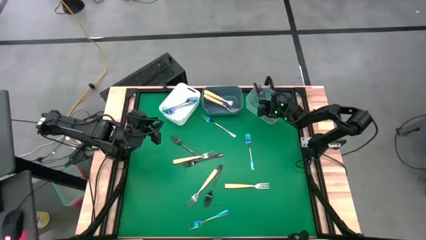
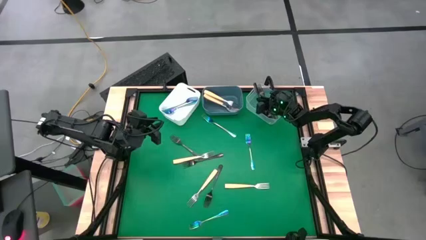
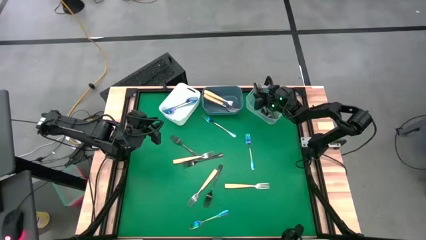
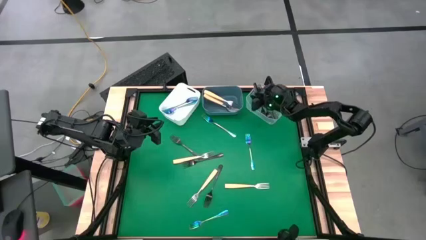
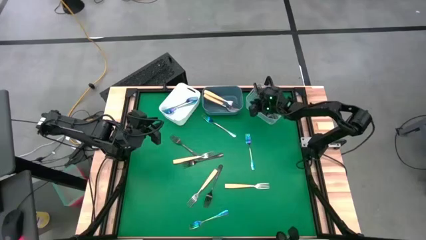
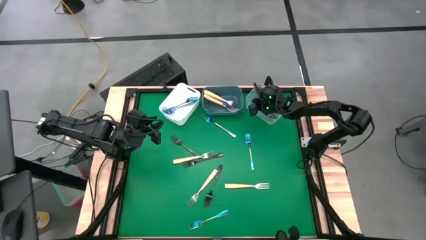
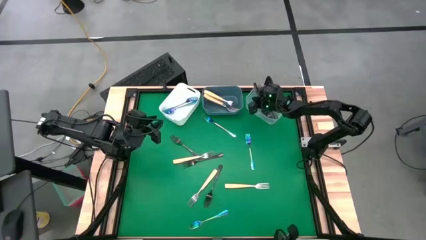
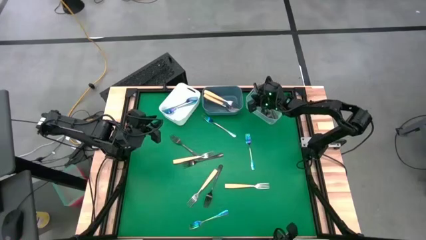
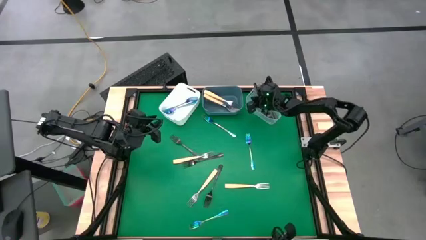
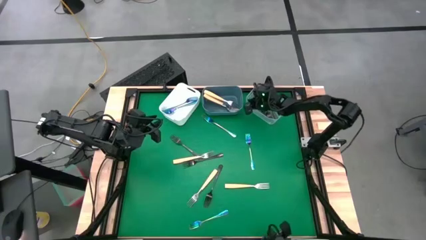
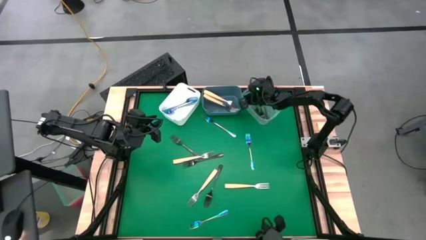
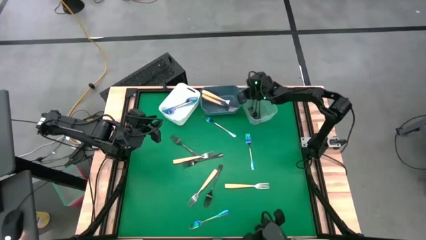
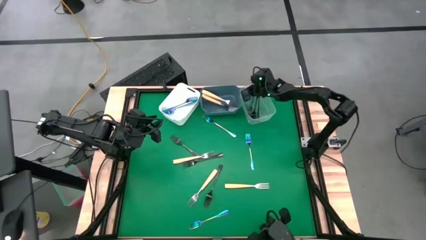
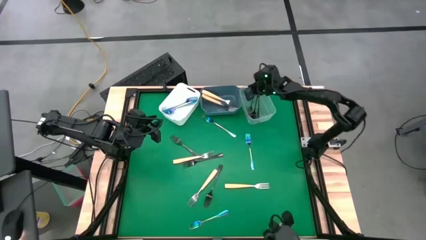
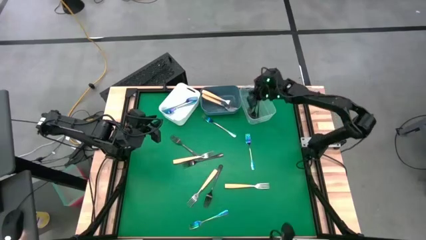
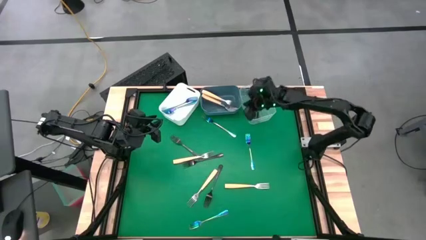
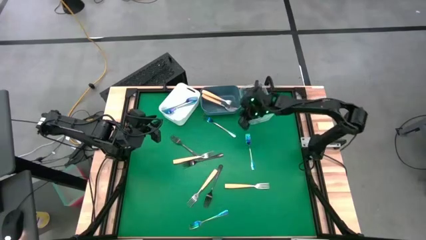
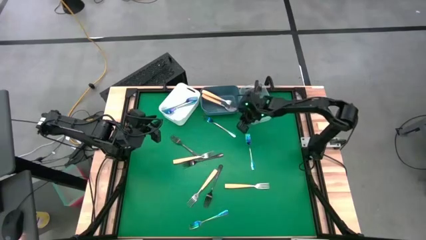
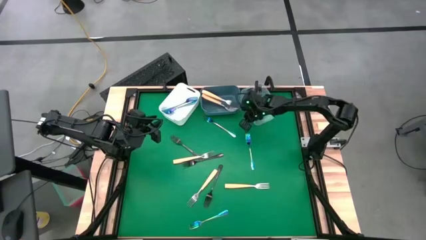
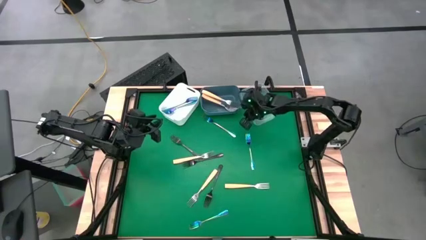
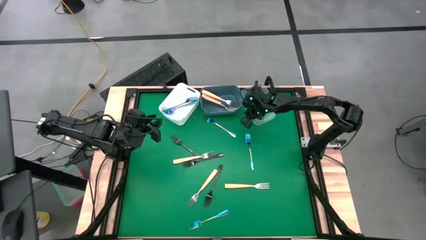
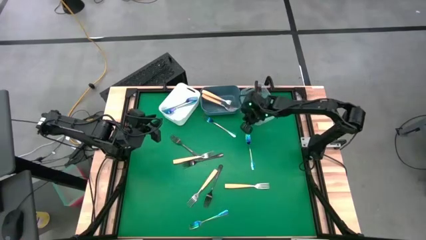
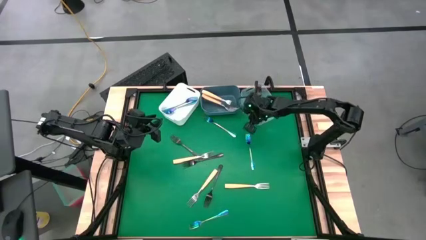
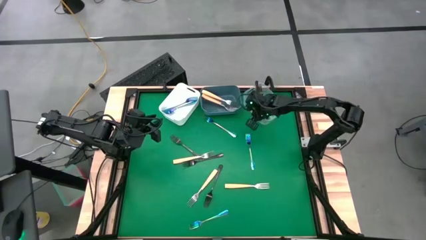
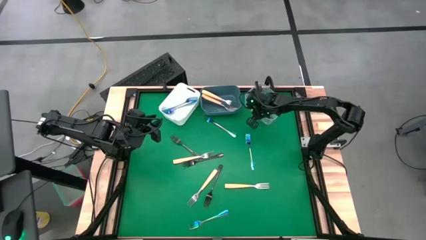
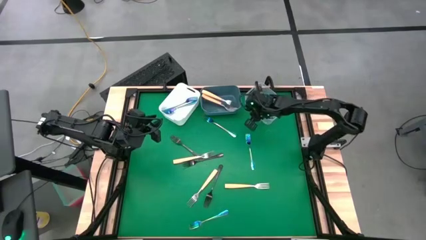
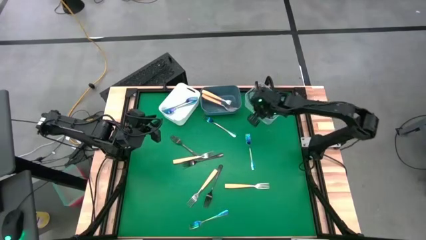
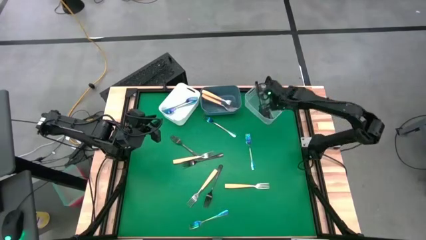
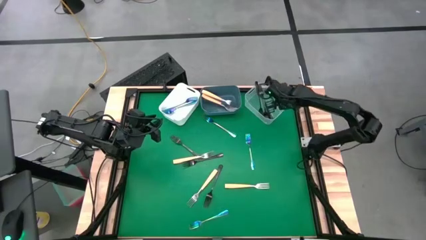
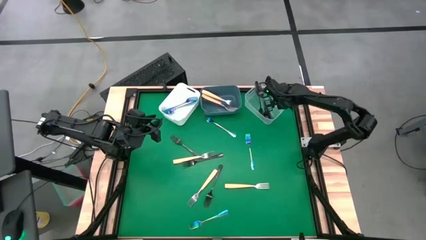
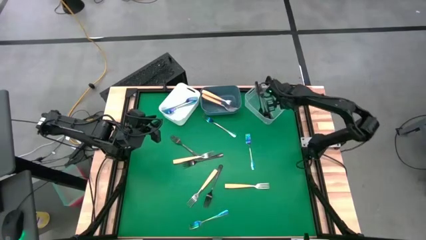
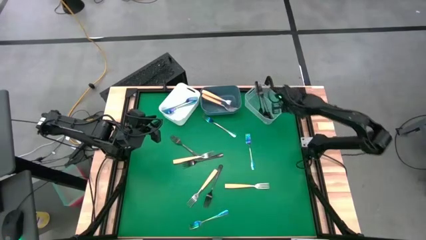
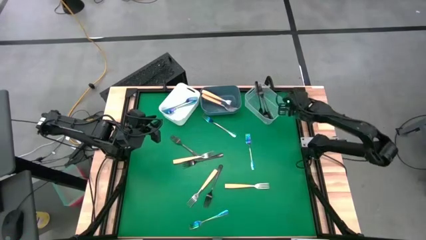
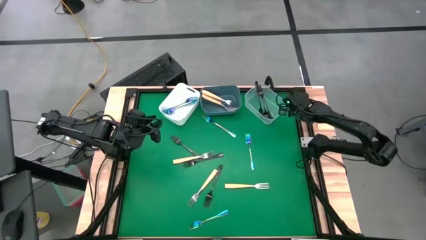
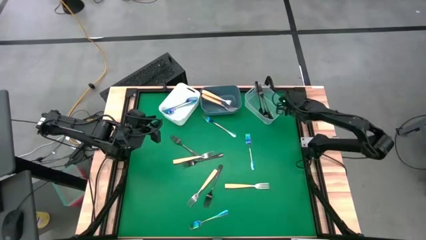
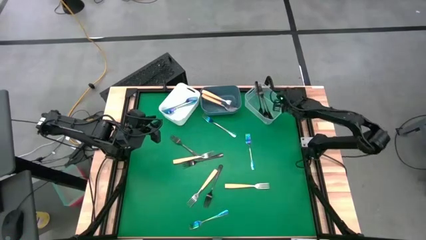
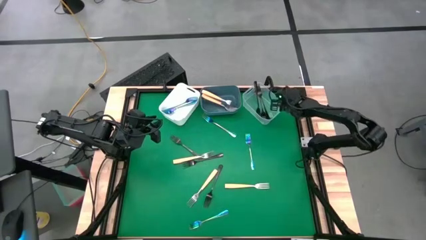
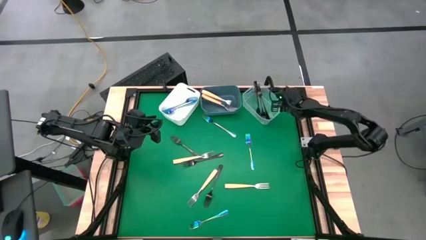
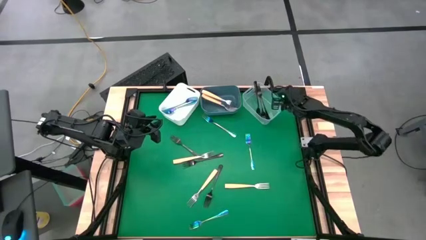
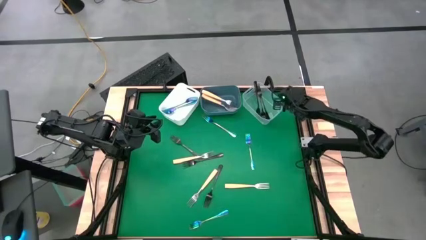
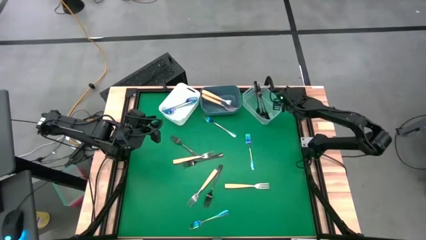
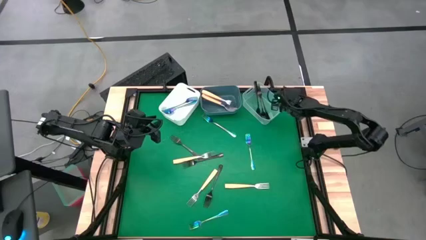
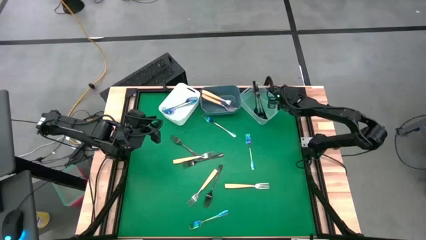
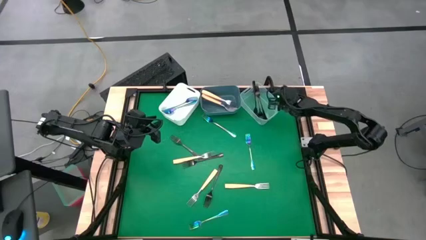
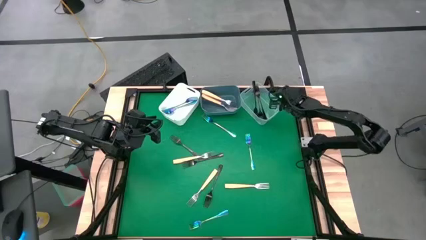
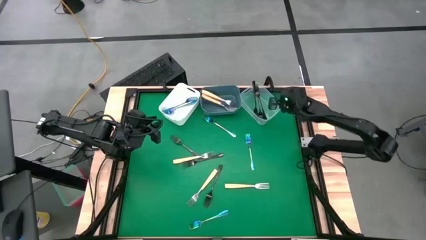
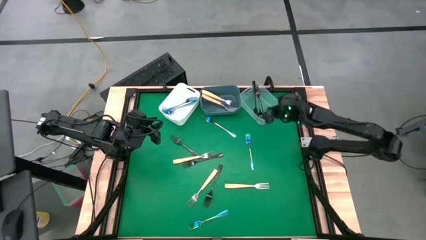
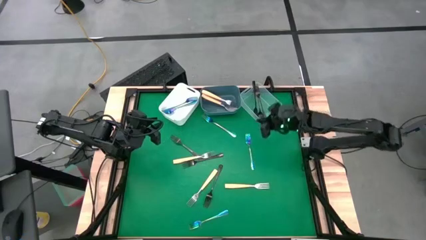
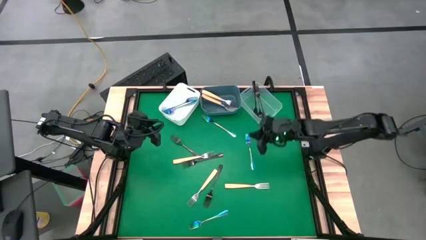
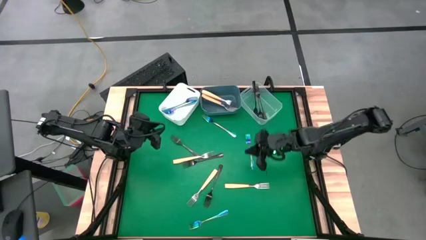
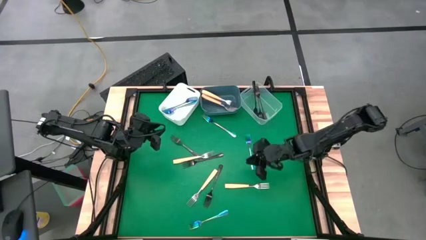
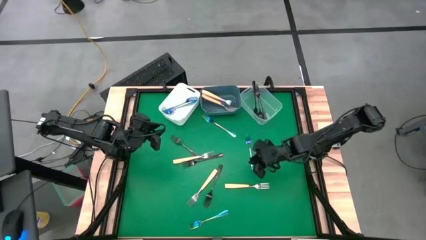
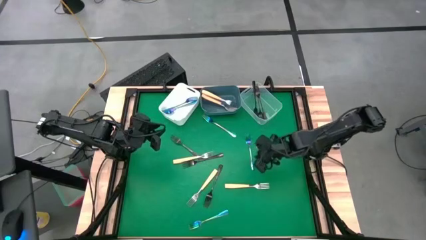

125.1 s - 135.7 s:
Task: Sort silverware by color (type)
Put the blue fork into the white bin

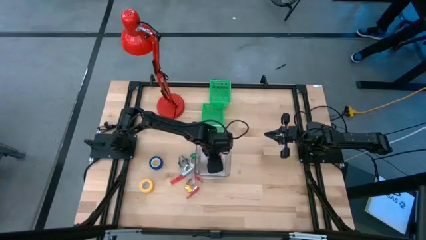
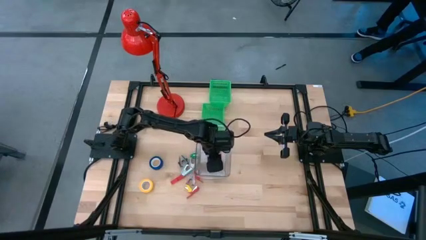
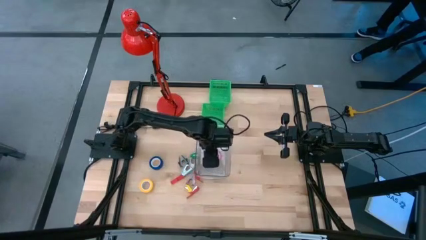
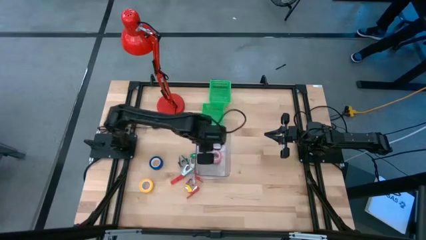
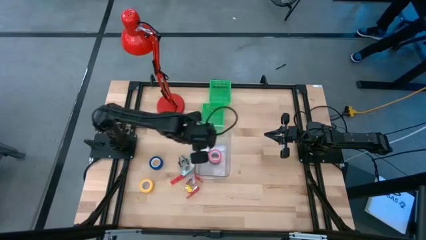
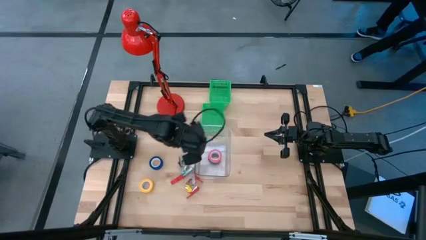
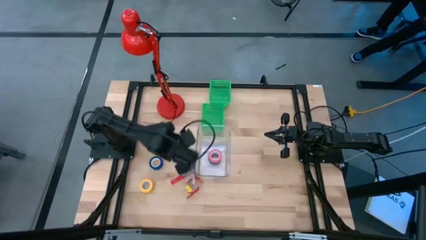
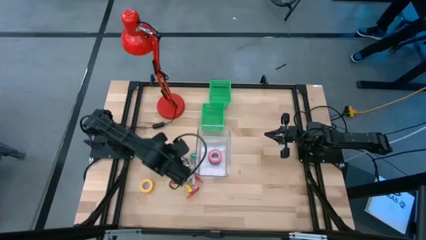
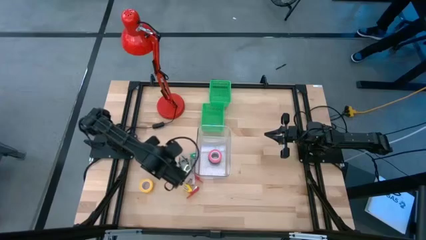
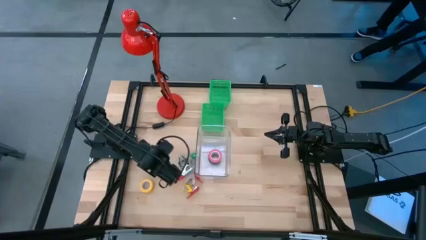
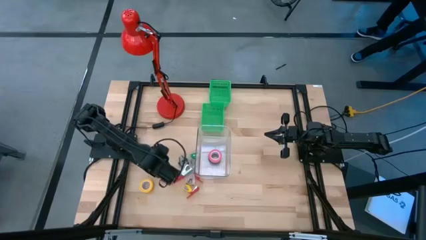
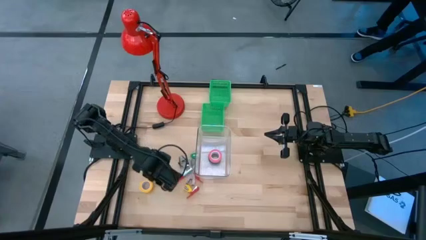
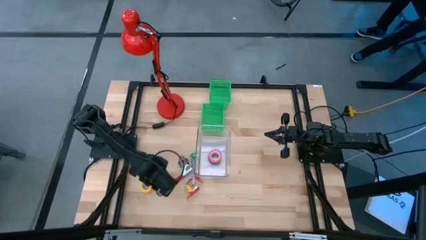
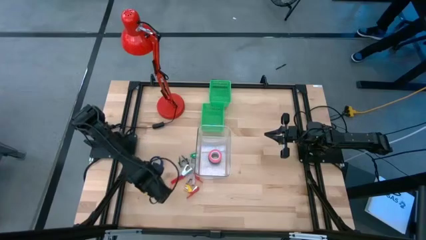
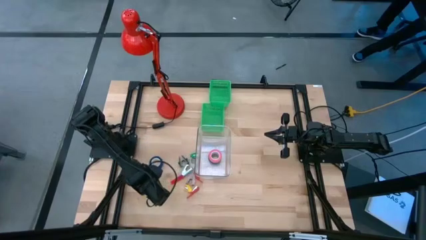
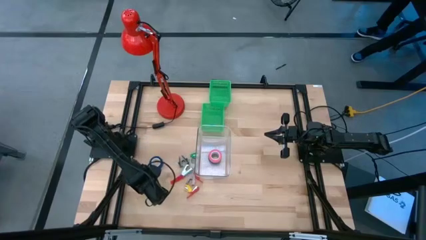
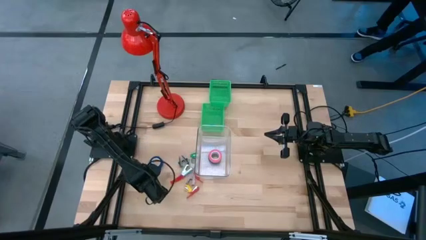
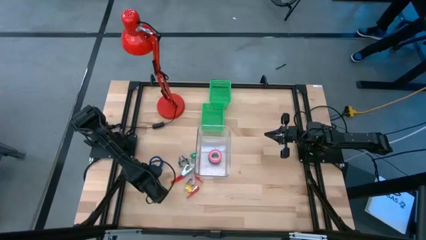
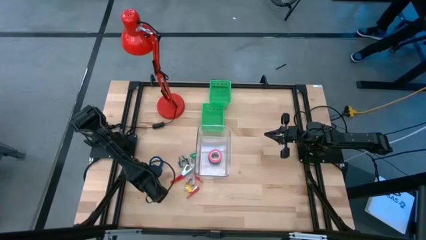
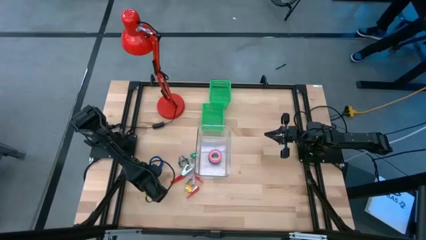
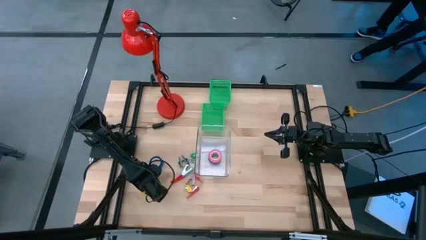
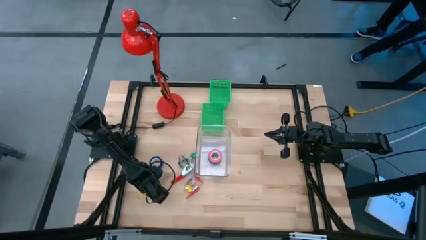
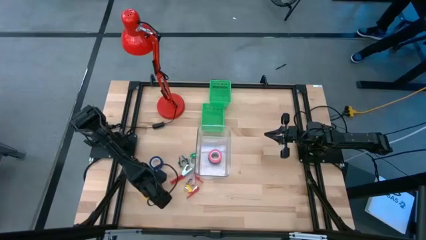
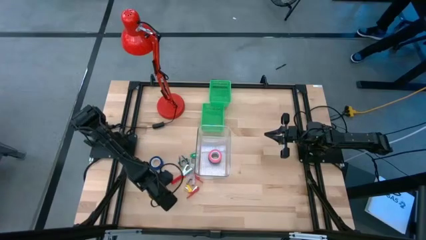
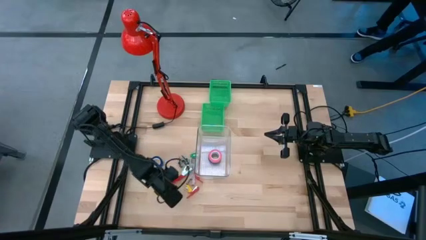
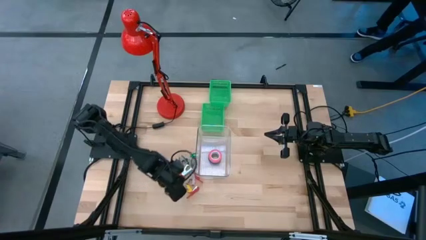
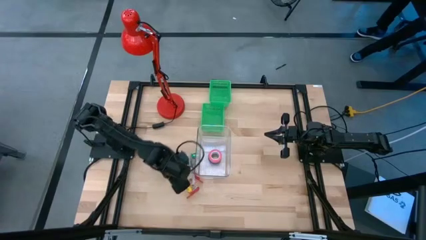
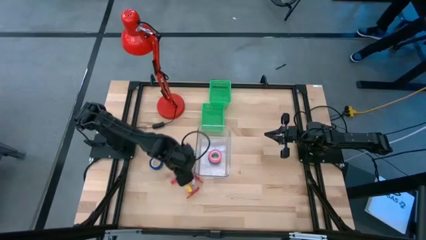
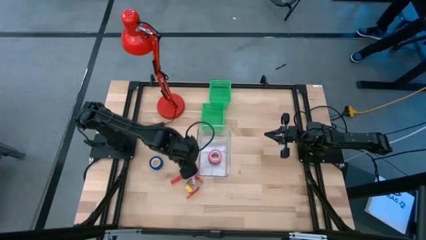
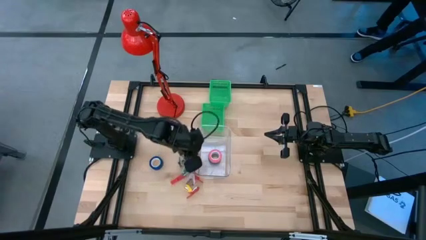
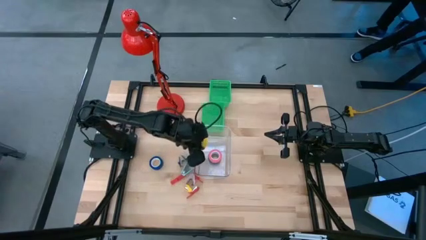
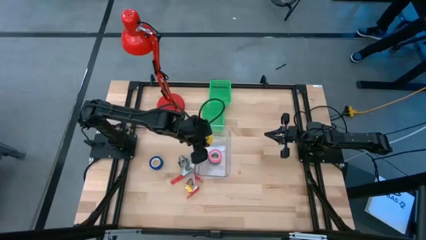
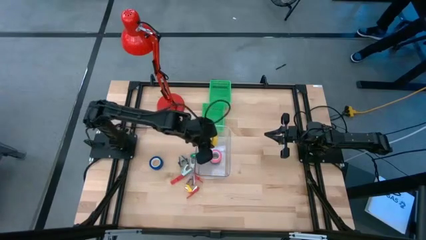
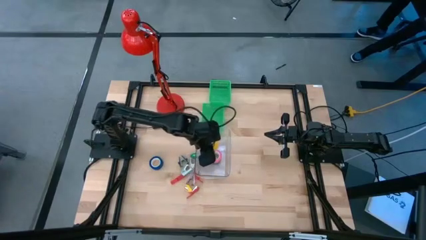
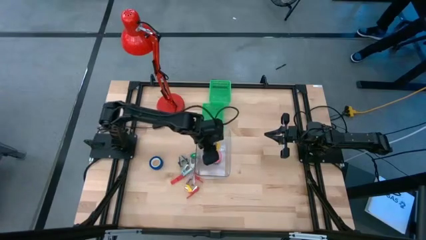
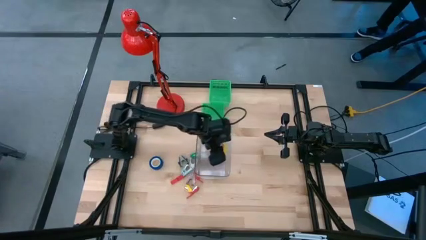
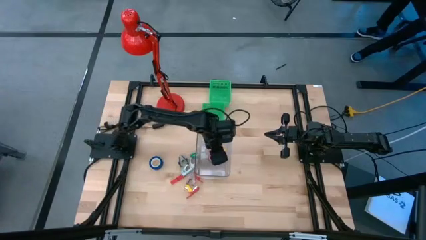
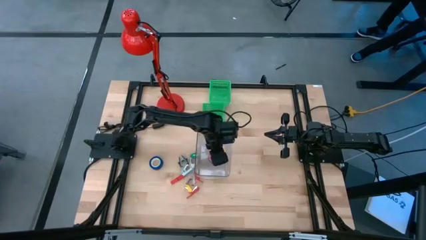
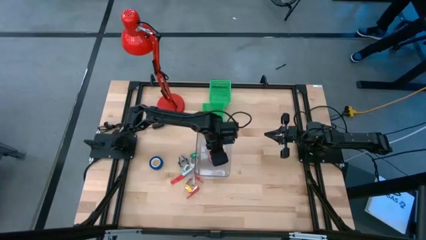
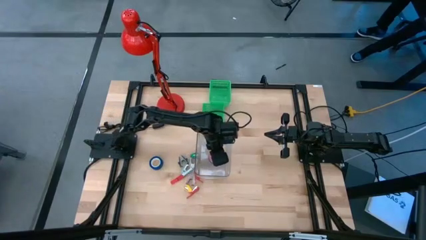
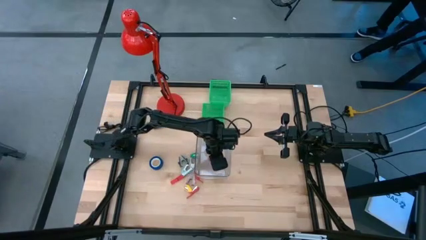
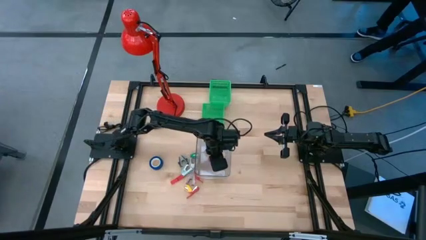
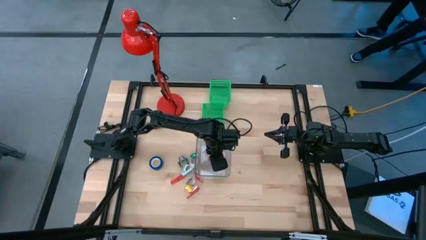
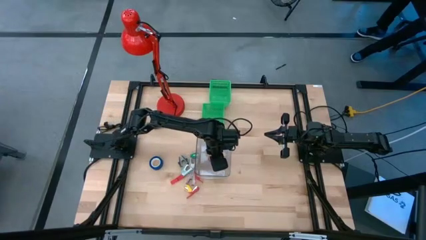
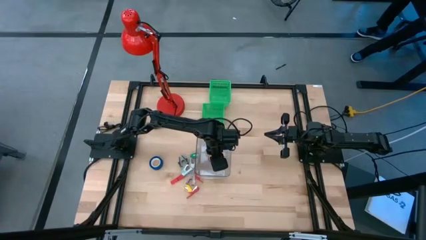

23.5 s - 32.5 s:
Task: Pick and place Stapler, Stapler remover, tape
Put the yellow tape into the transparent bin
